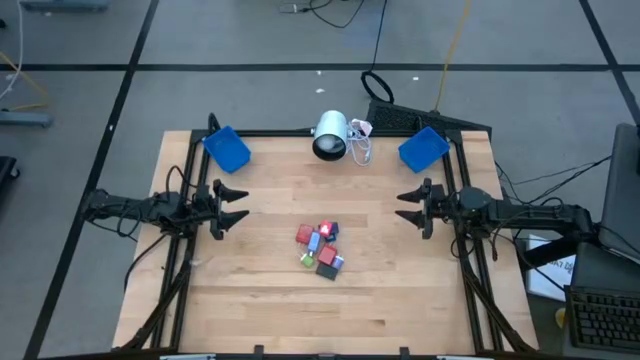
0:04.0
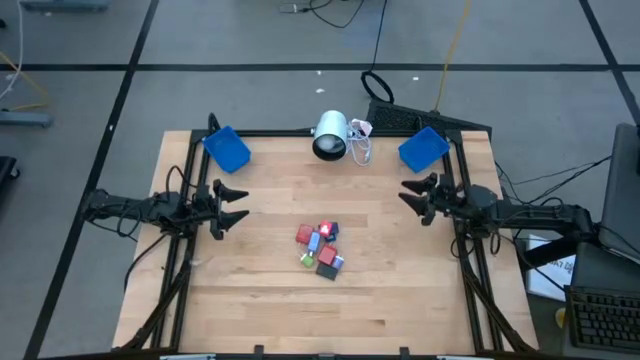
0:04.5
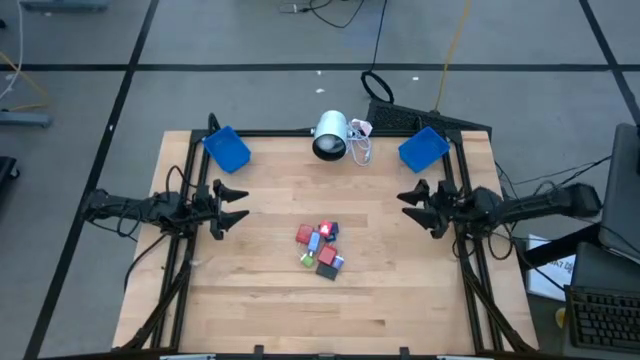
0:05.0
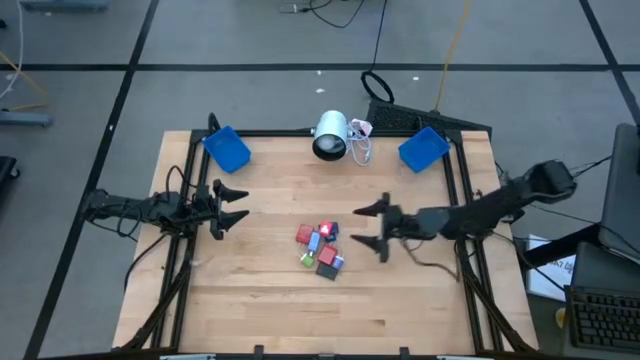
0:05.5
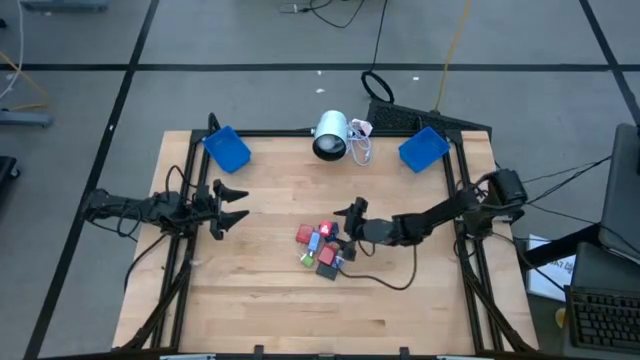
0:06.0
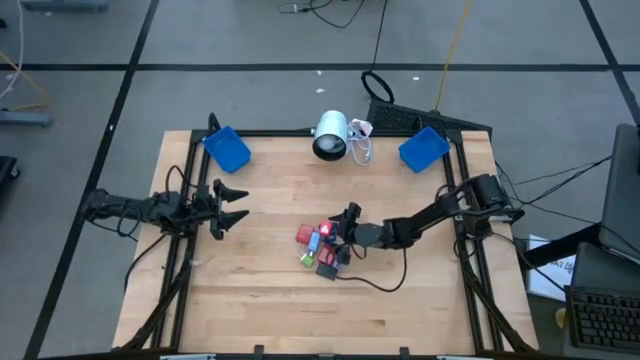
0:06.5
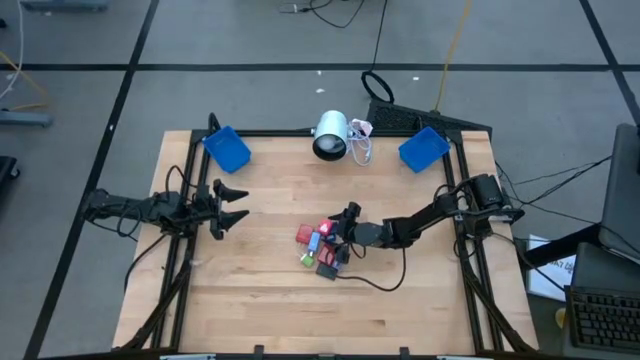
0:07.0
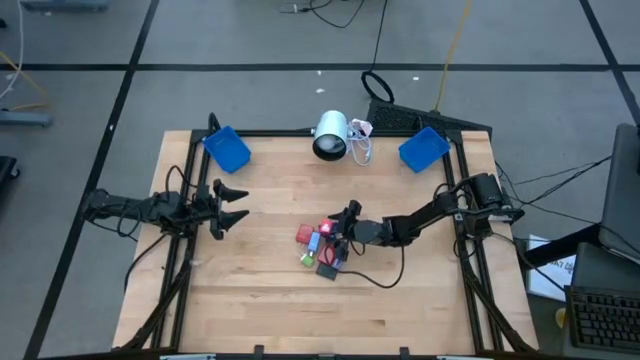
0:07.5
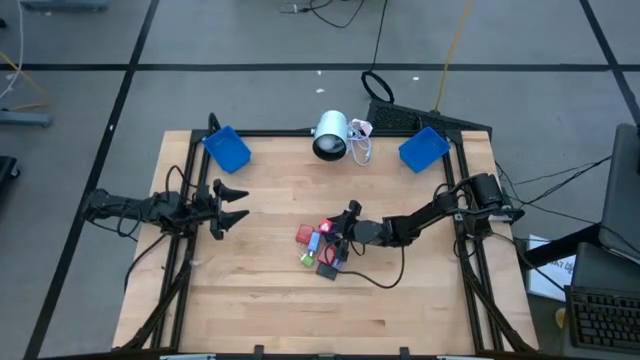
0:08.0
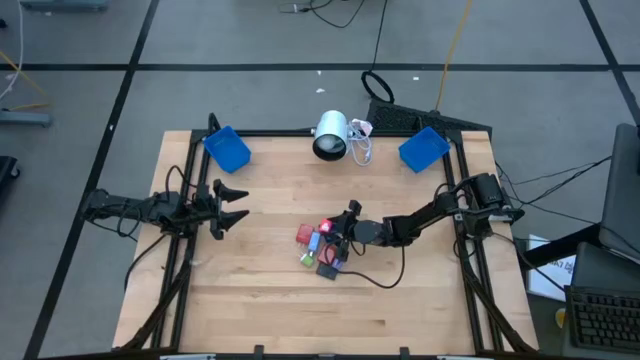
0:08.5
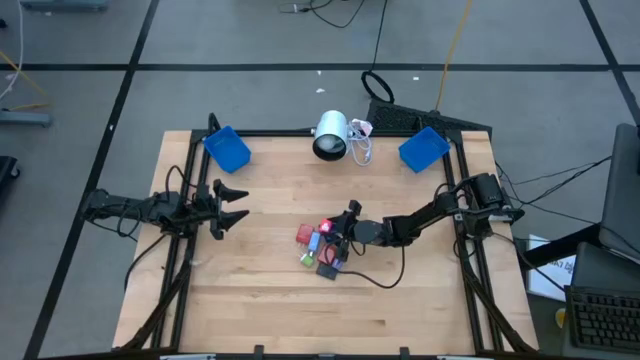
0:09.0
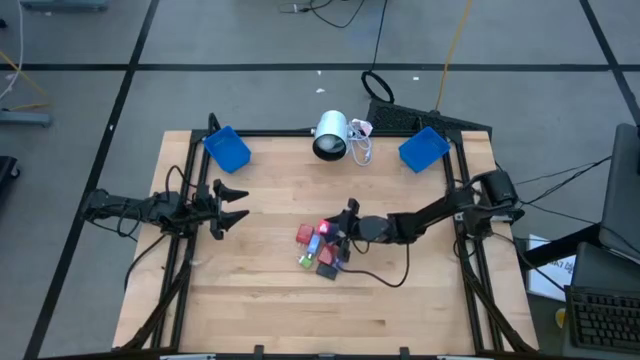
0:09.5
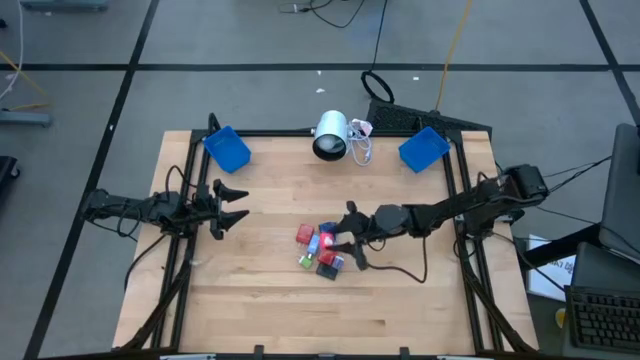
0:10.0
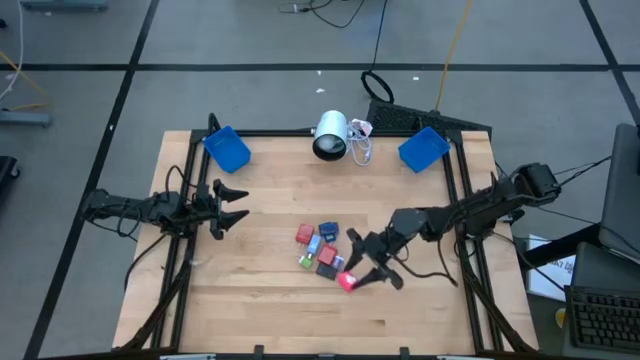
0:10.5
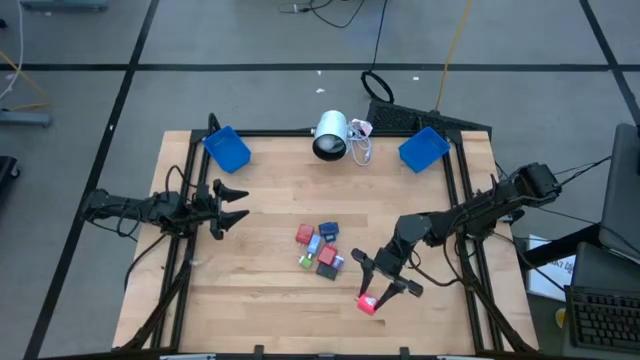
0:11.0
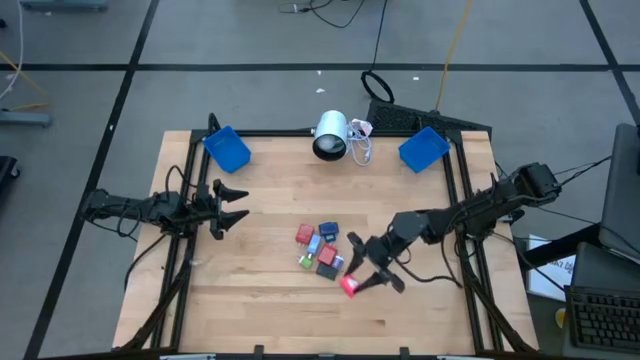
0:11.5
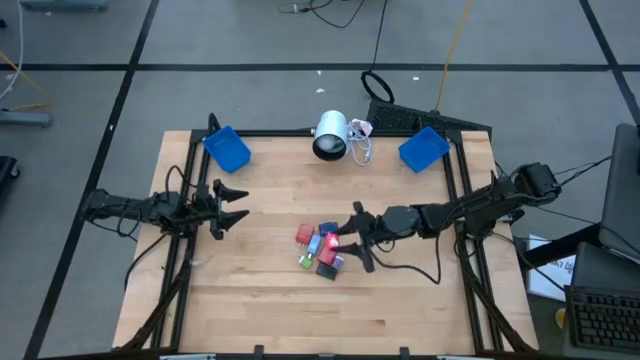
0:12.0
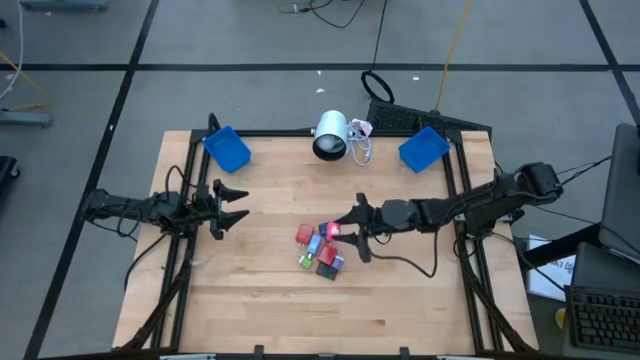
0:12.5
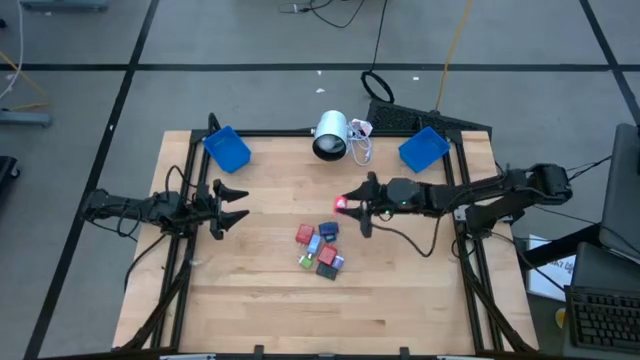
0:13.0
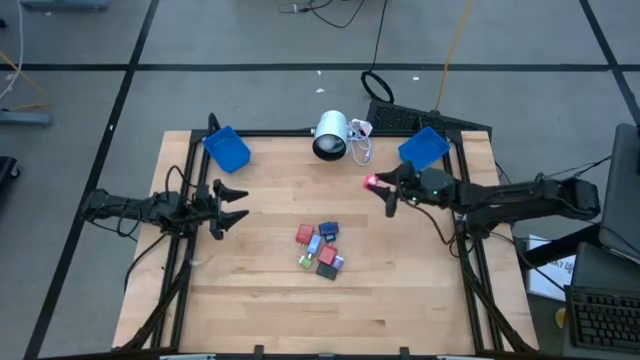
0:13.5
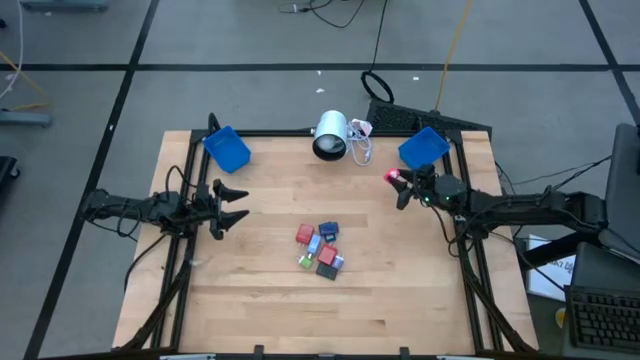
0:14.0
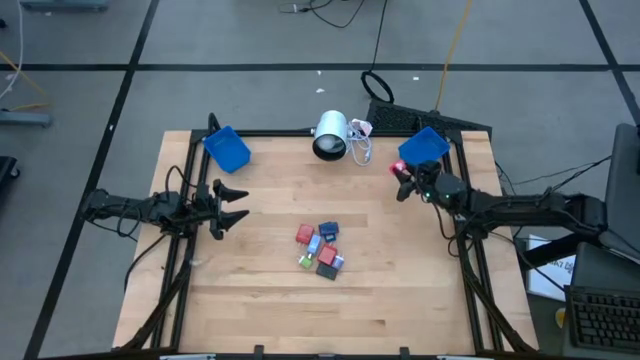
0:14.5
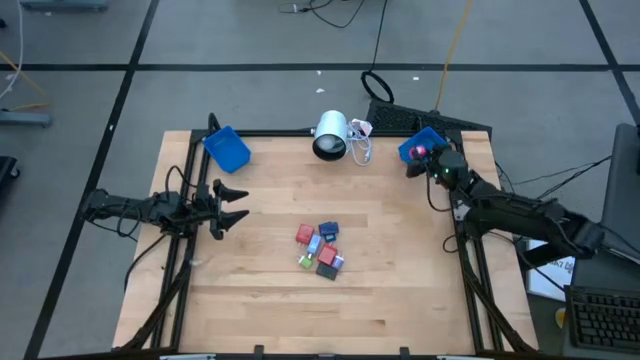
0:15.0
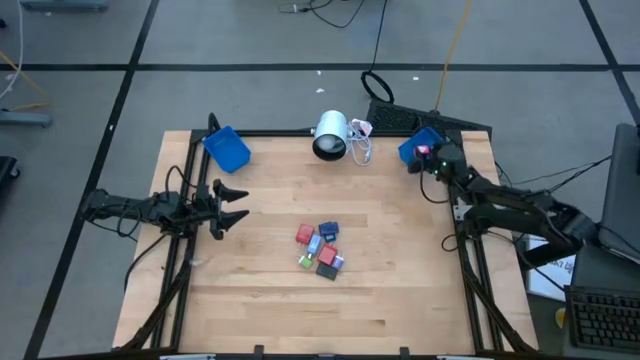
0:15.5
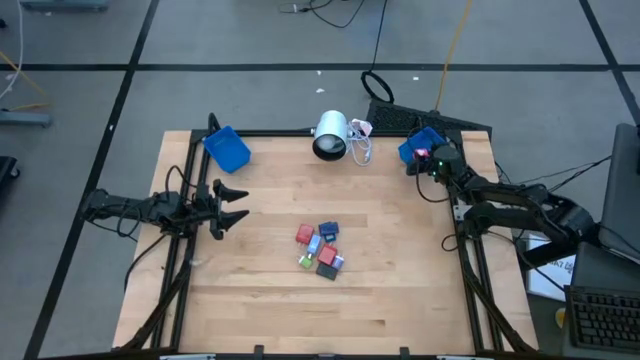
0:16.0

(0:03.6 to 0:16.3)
Task: Pick & Place Office items
Put the pink charger adapter into the right blue bin

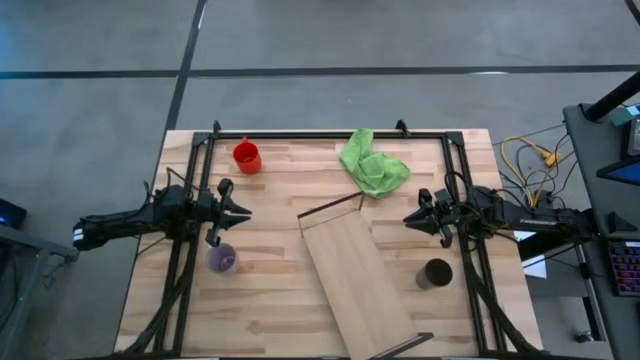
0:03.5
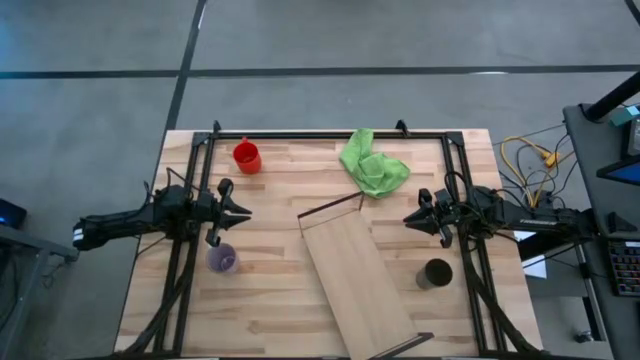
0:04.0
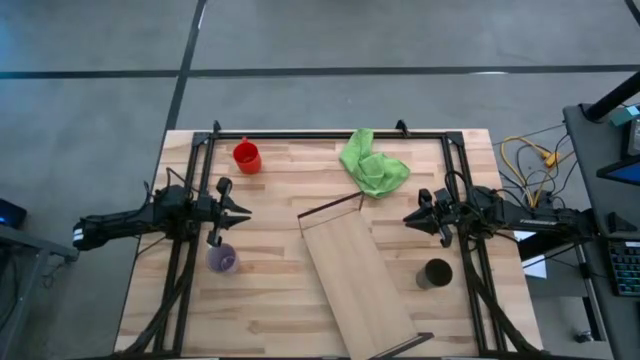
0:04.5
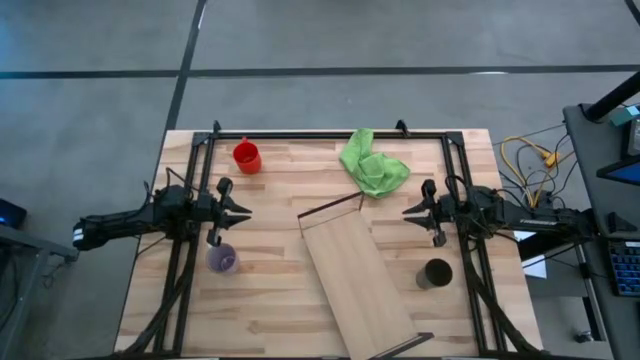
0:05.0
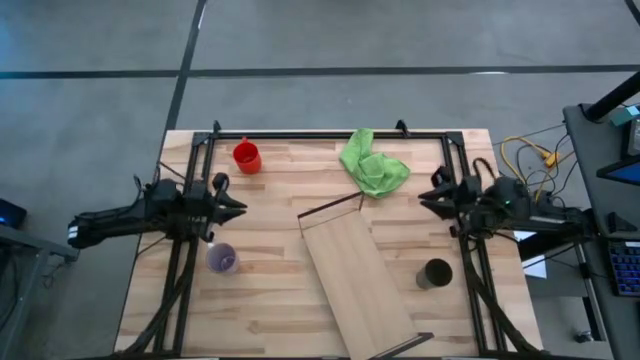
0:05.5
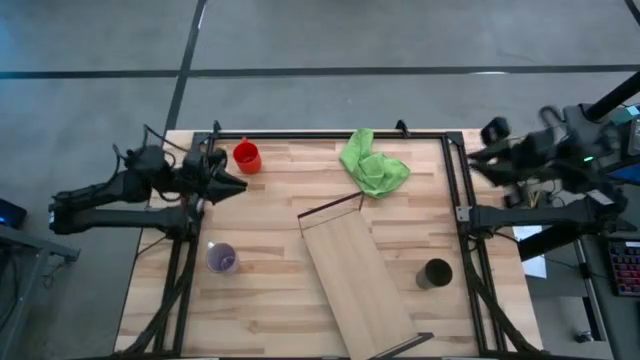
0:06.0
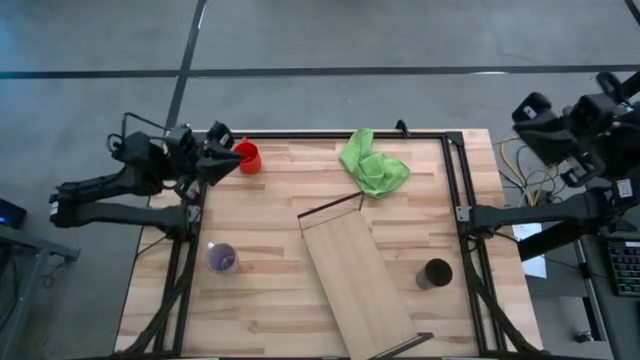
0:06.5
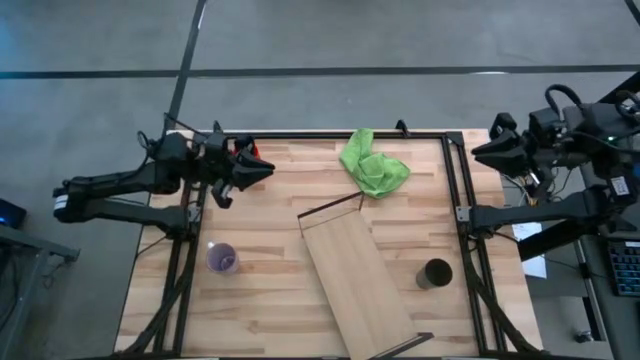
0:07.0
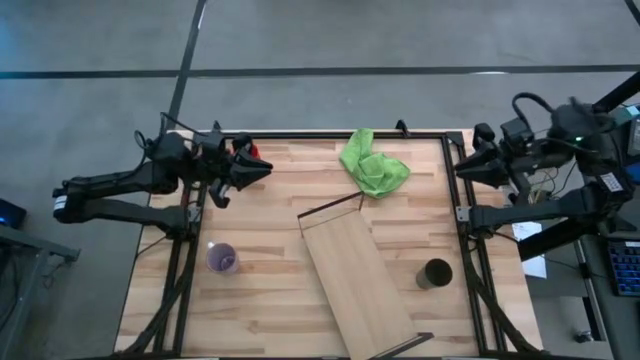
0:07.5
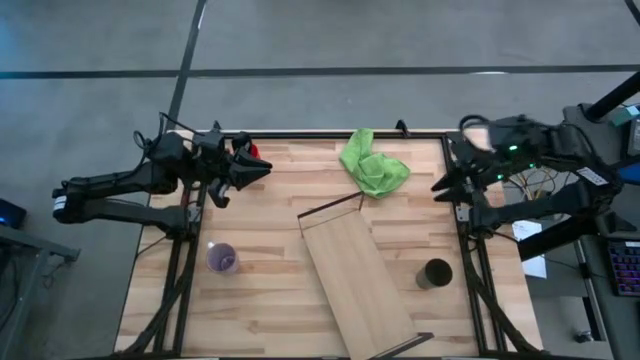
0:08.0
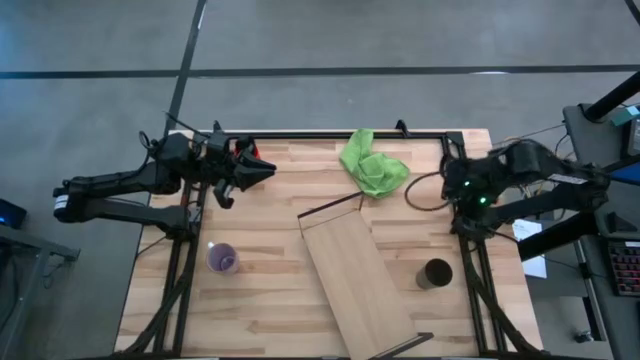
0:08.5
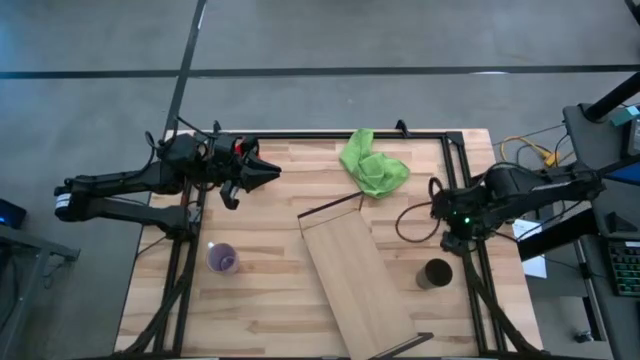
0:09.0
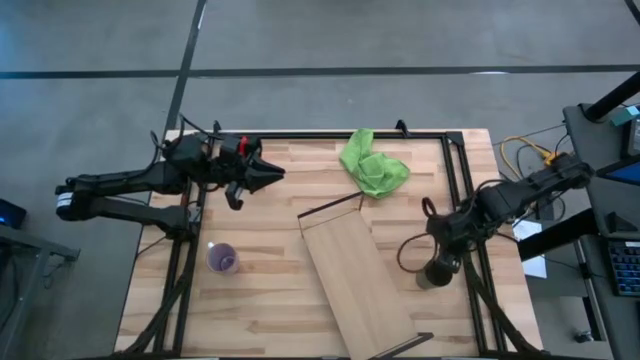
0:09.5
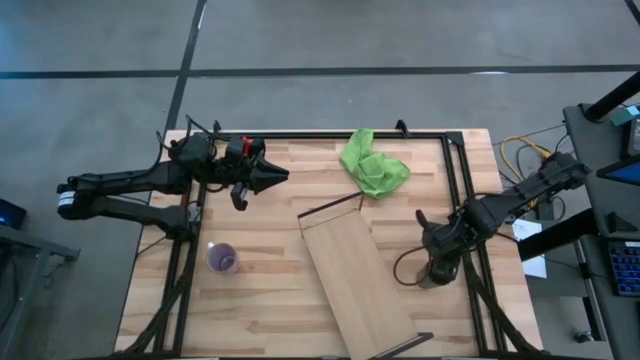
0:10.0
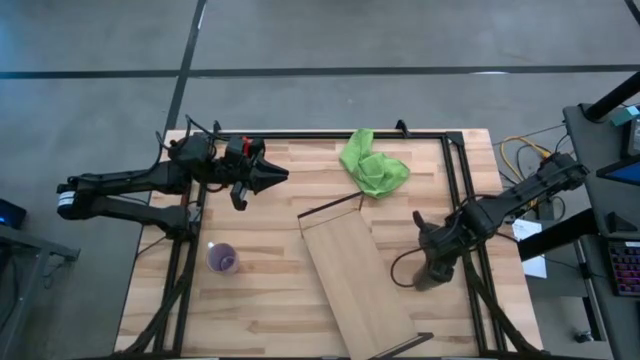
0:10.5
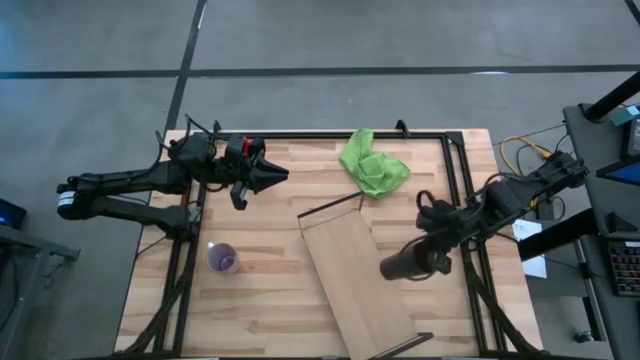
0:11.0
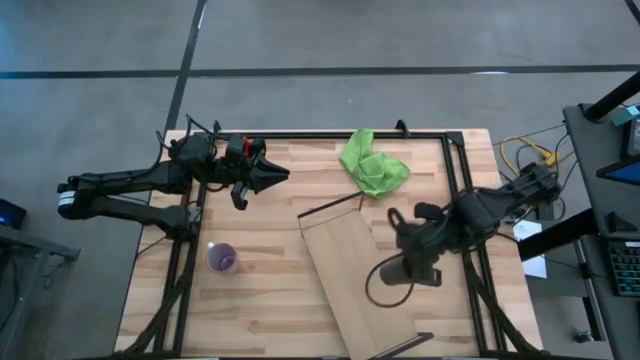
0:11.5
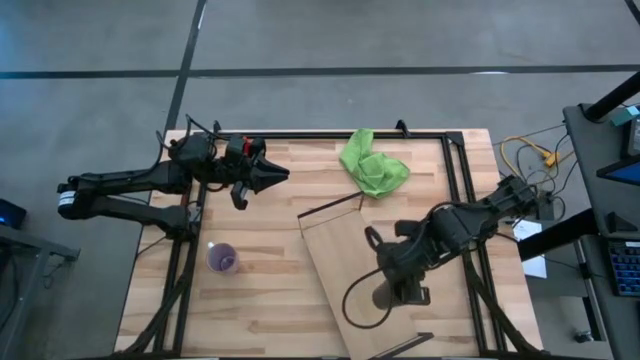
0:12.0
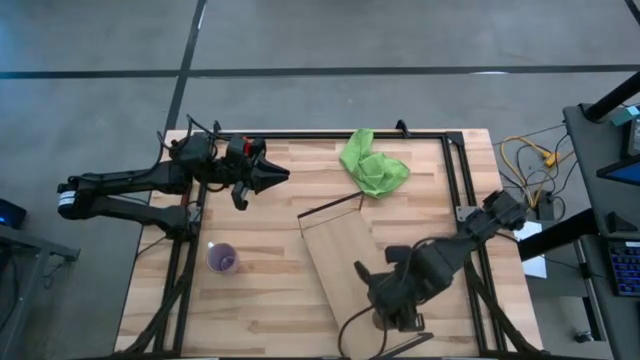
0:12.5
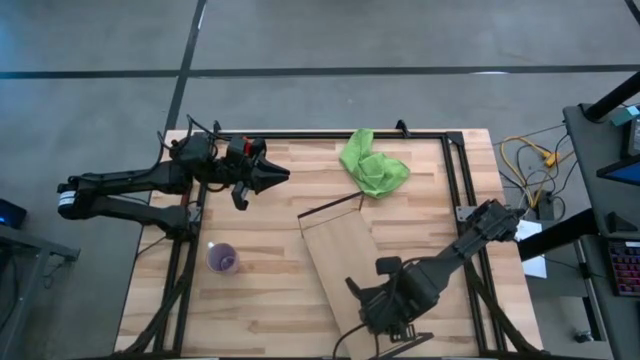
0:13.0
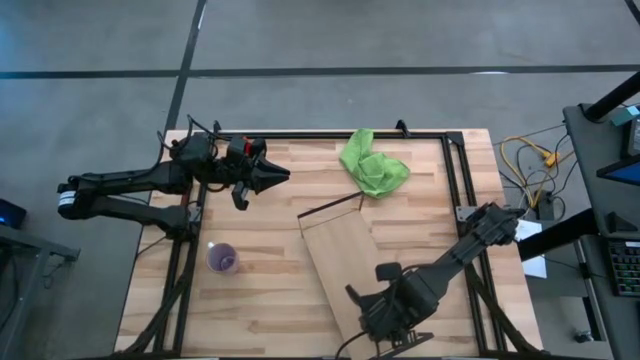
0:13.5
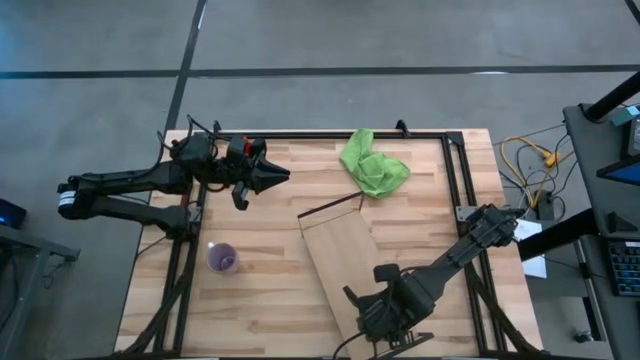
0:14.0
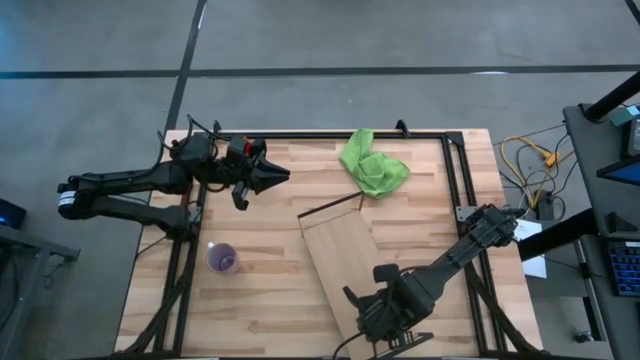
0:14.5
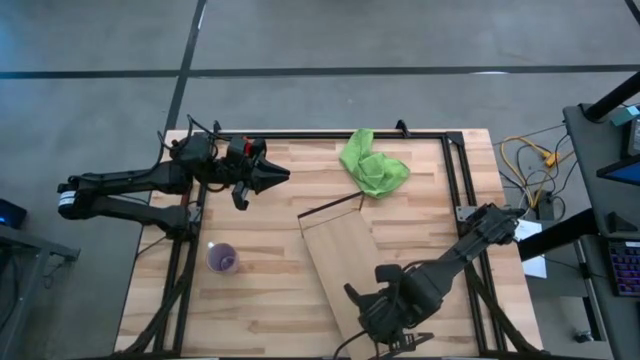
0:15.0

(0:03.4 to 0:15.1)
Task: Stack small to large cups/mugs on shelf
Put the black cup on the shelf
